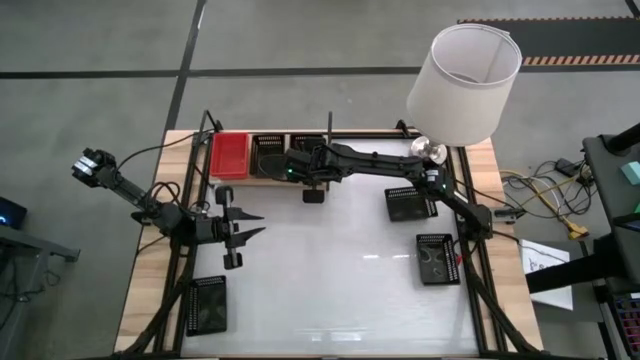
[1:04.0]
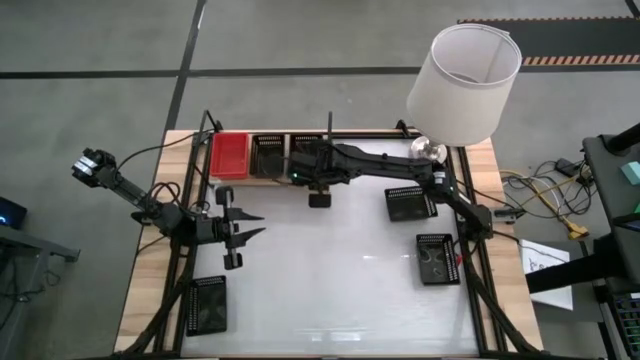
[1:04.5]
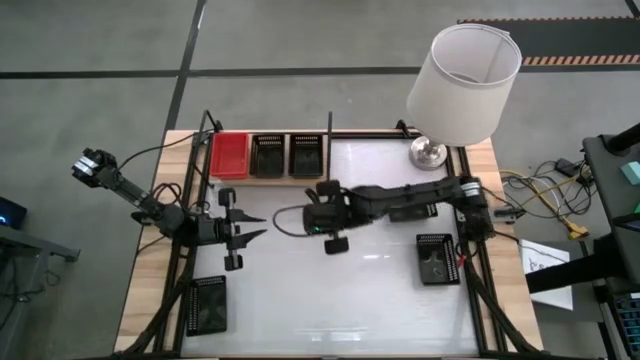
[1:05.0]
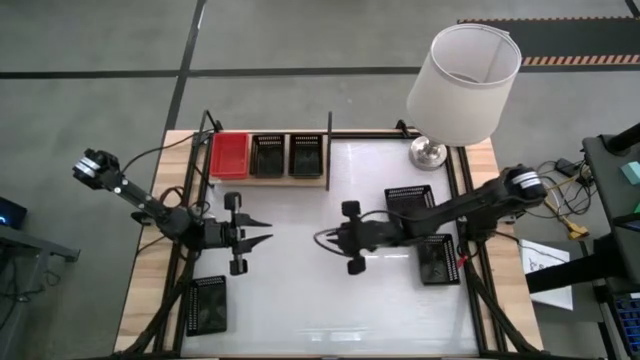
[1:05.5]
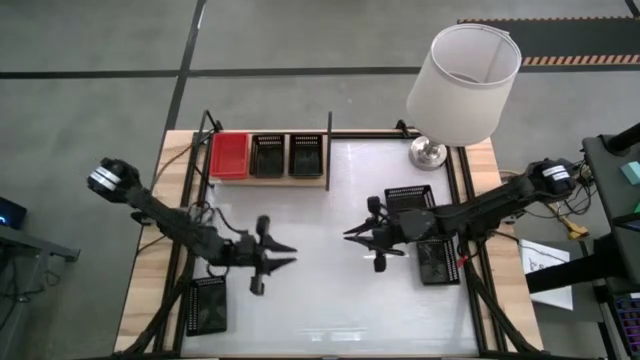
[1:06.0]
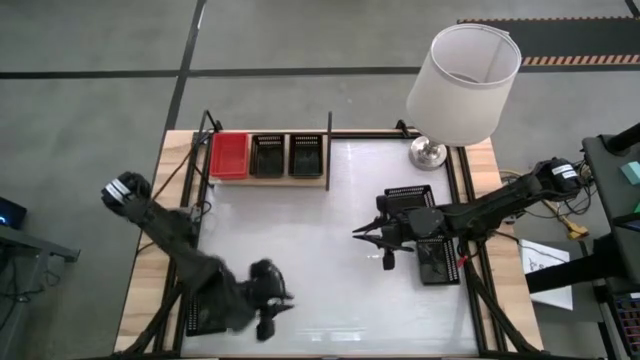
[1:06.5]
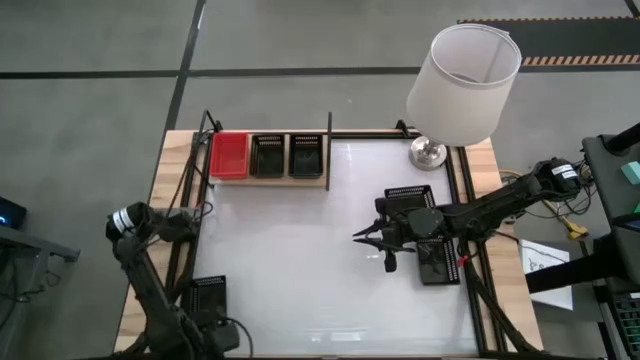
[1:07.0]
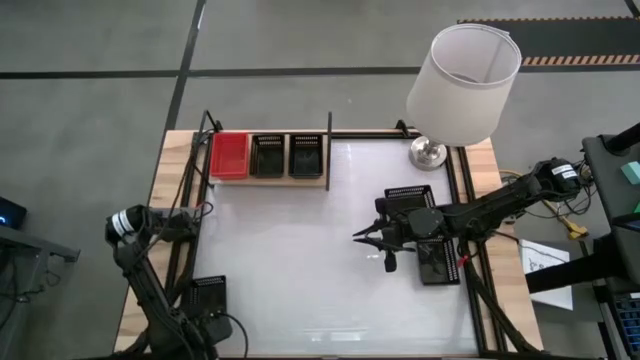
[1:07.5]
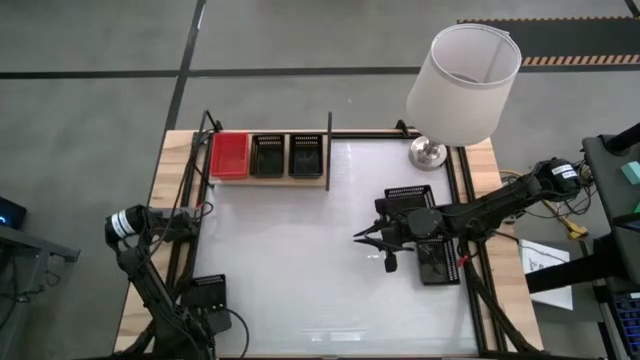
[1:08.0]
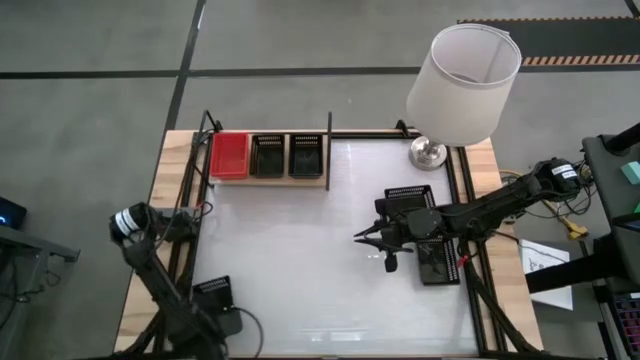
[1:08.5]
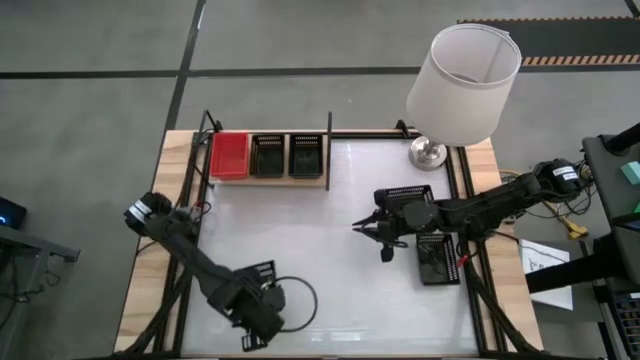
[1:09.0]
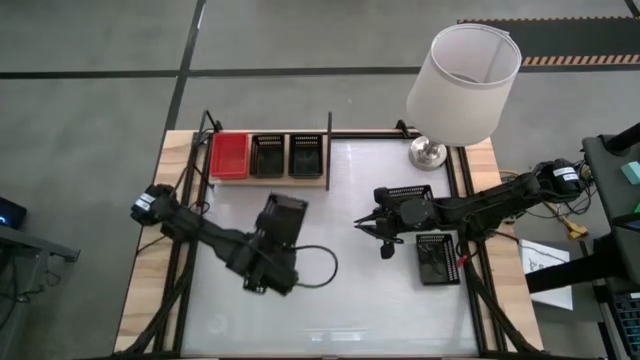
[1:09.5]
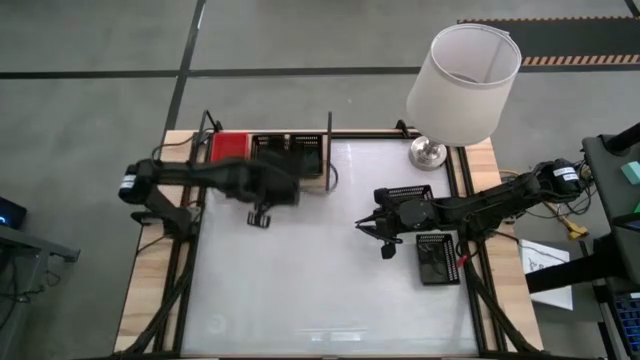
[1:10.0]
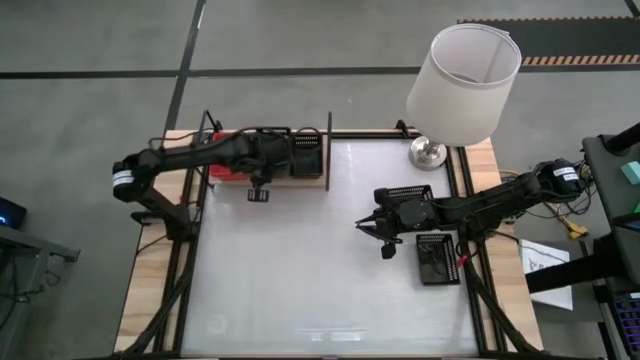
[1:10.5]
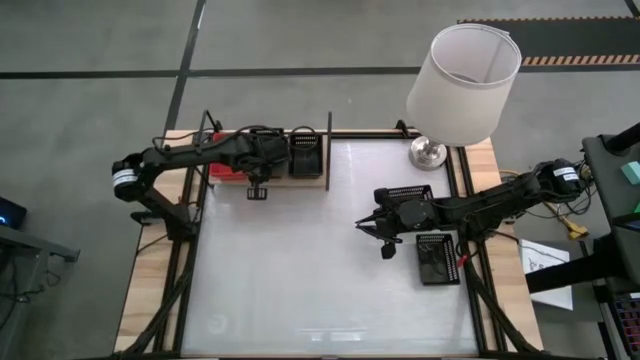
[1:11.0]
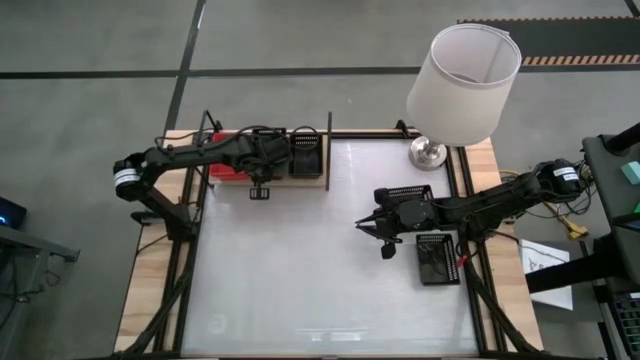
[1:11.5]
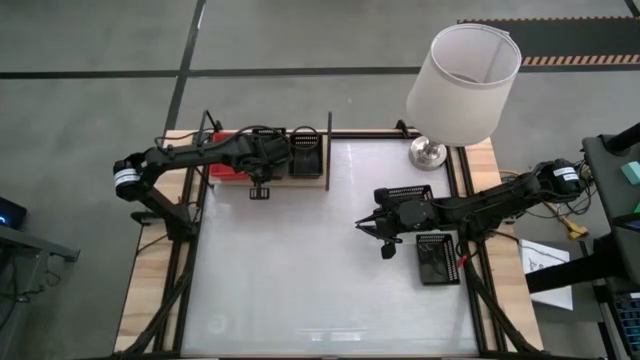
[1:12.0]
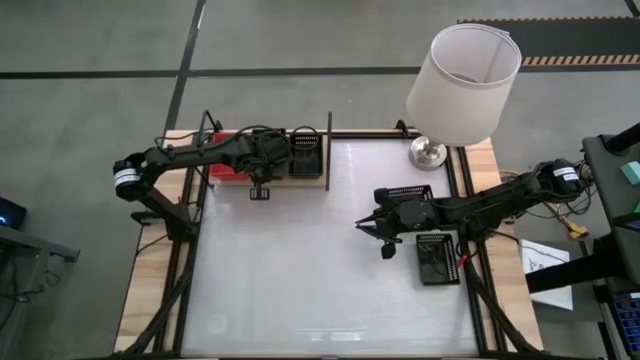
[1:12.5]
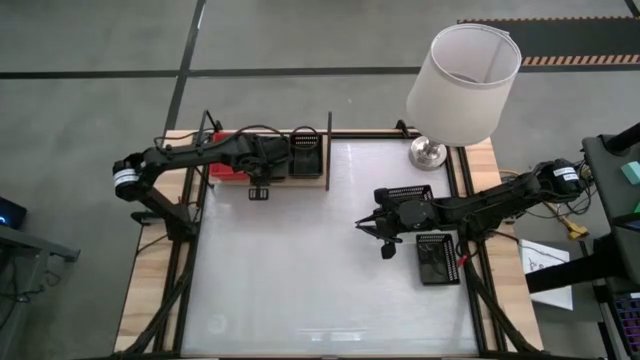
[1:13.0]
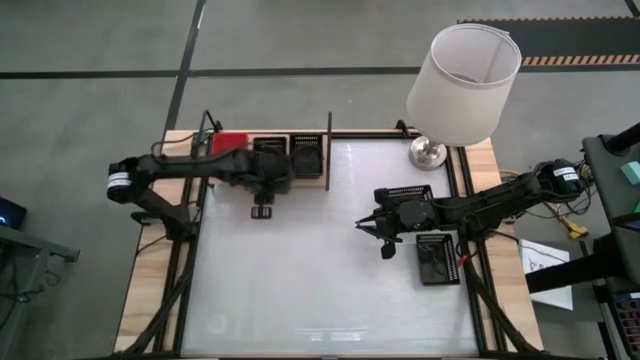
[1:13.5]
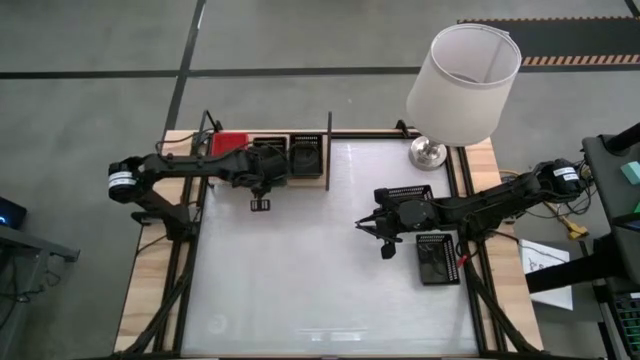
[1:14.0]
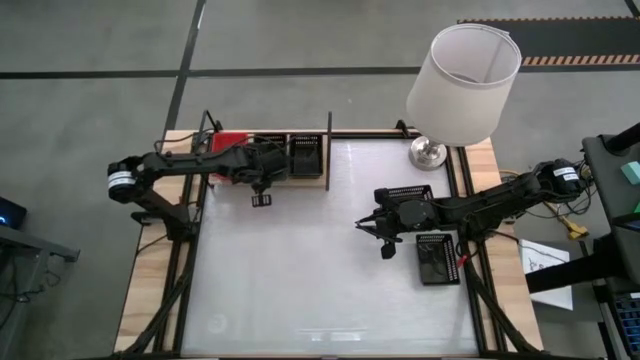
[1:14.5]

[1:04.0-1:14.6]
Task: Stack baskets on shelf by color
Stack the black basket on top of the left black basket on the shelf

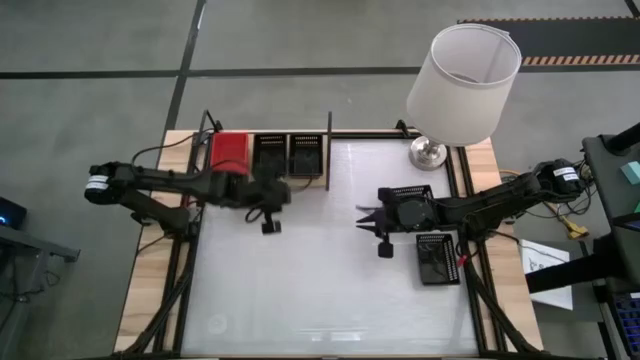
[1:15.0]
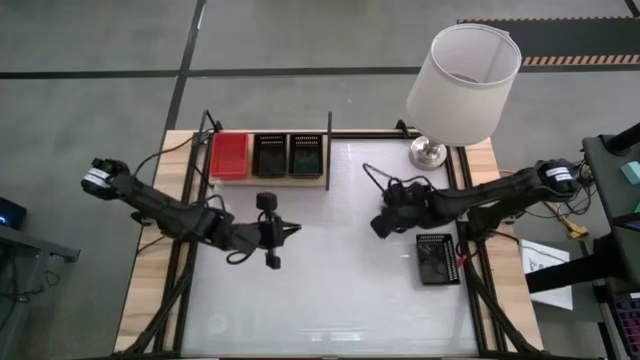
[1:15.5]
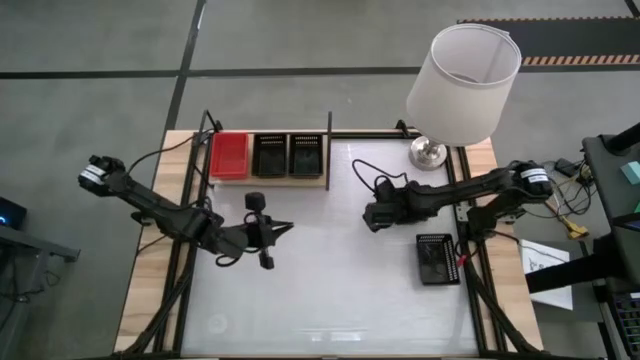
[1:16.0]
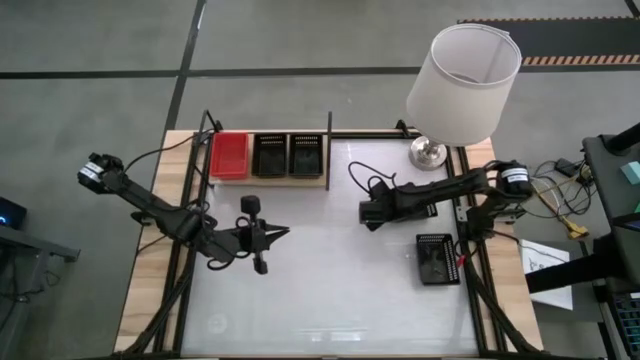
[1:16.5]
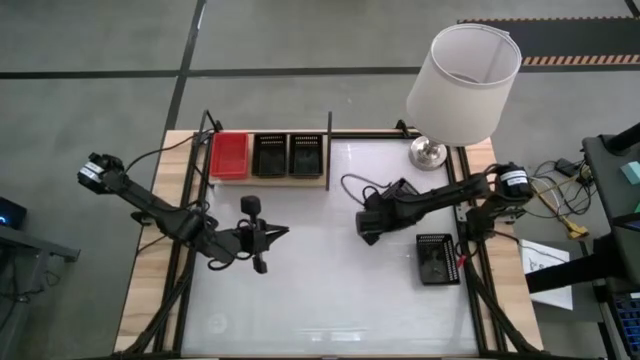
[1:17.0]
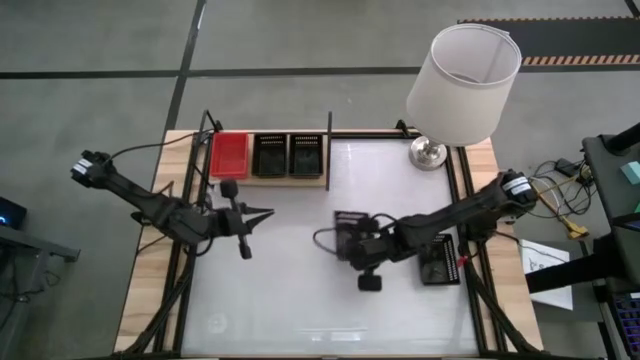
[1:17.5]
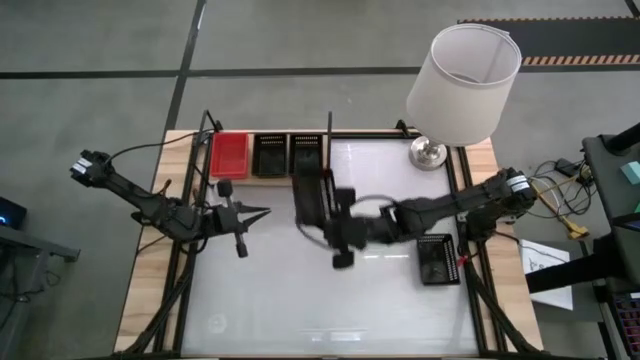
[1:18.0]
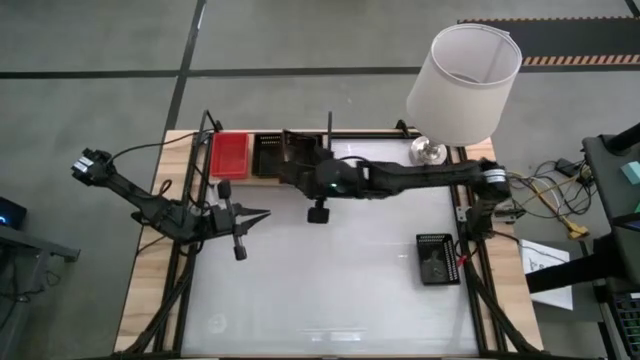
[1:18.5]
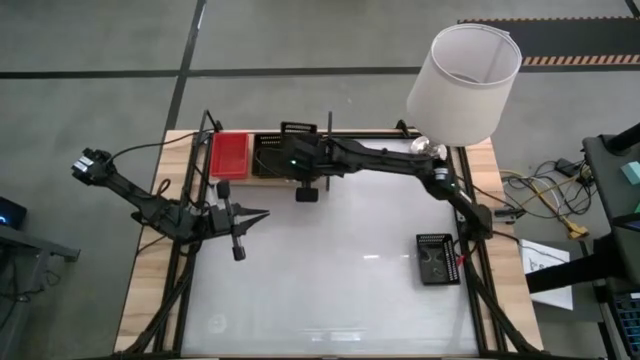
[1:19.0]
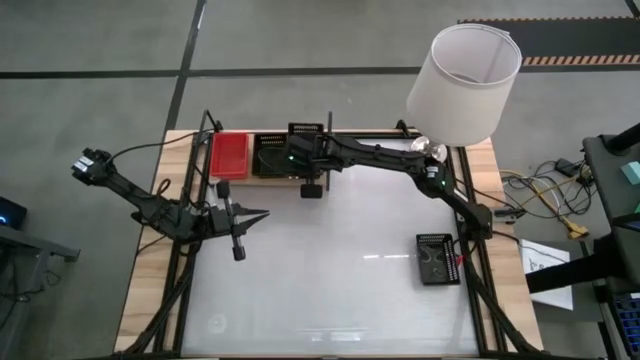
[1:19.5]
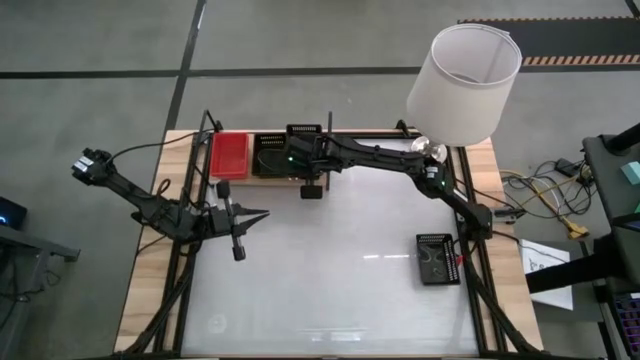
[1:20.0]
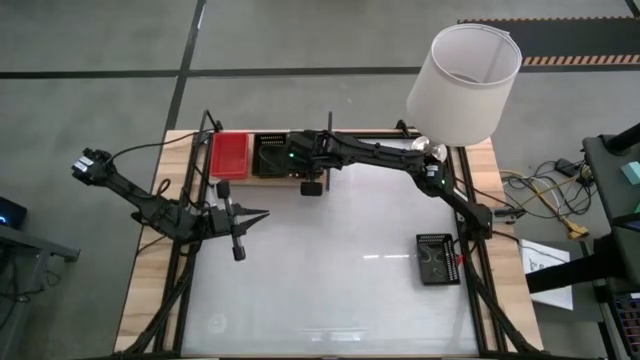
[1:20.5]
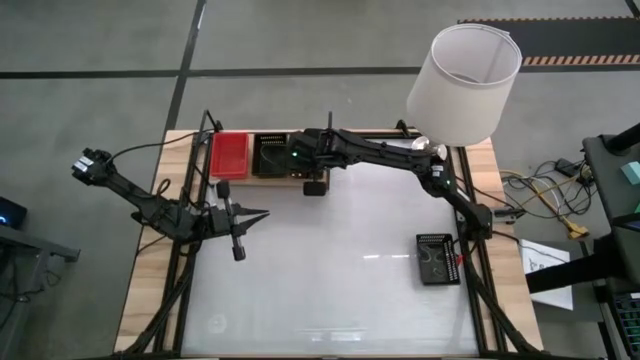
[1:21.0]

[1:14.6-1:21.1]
Stack the black basket on top of the right black basket on the shelf

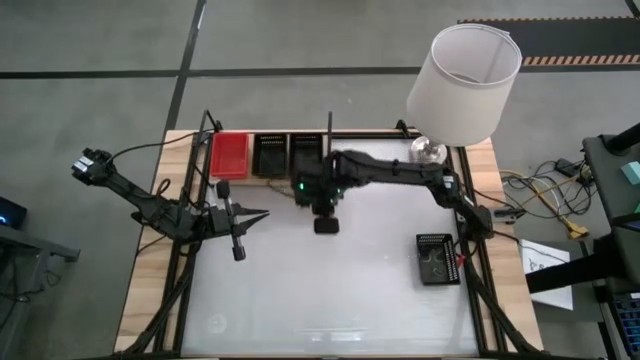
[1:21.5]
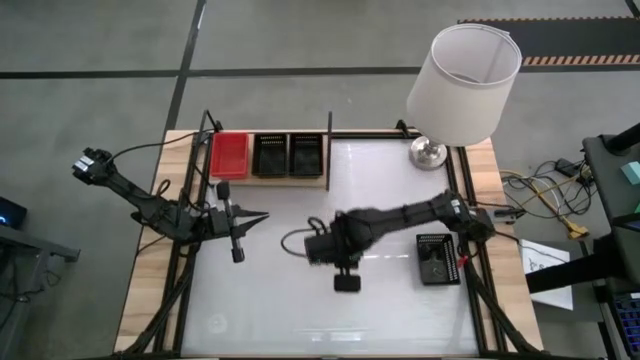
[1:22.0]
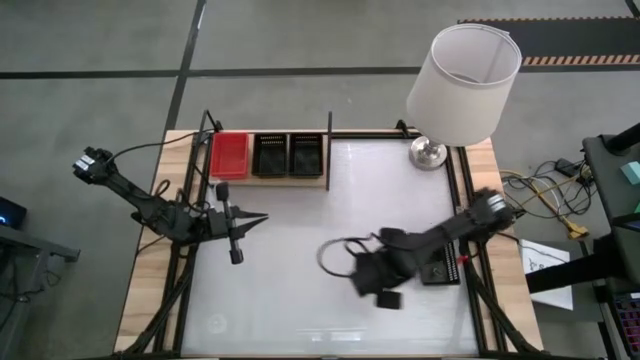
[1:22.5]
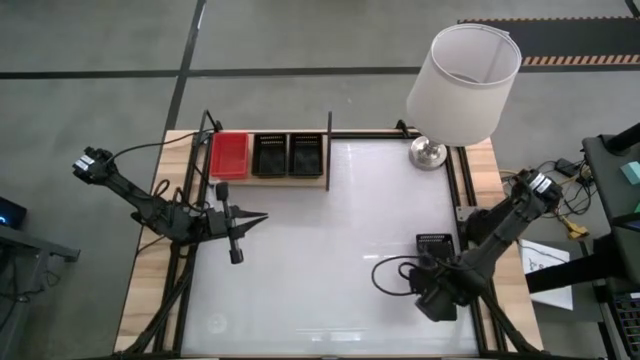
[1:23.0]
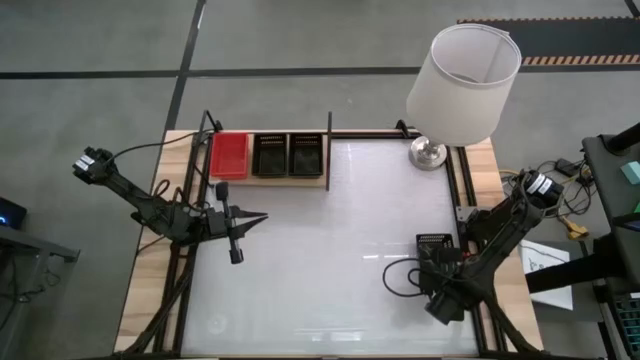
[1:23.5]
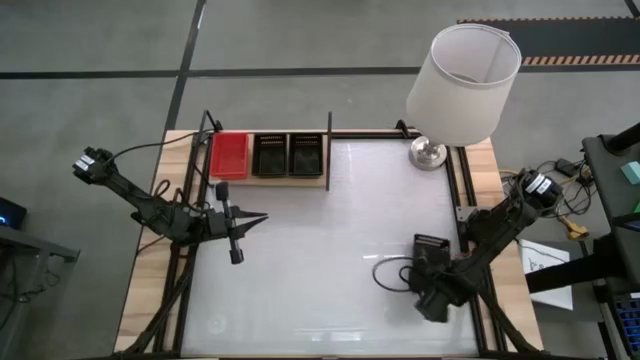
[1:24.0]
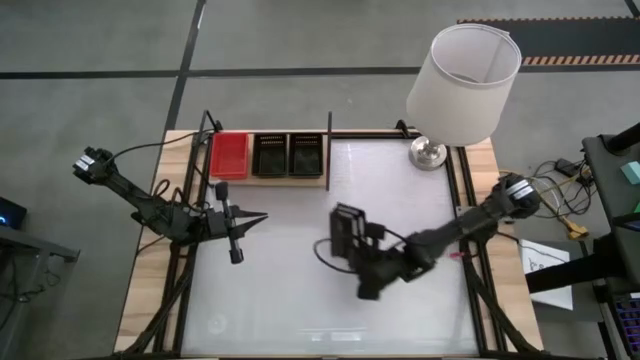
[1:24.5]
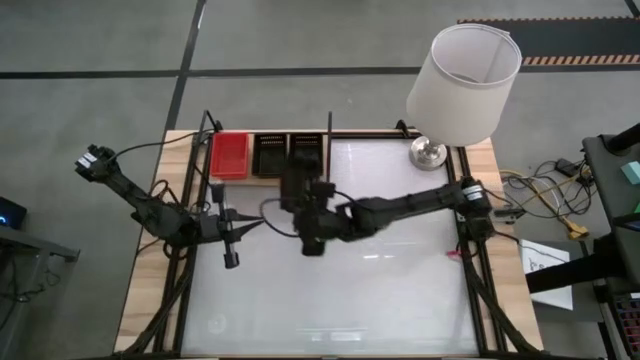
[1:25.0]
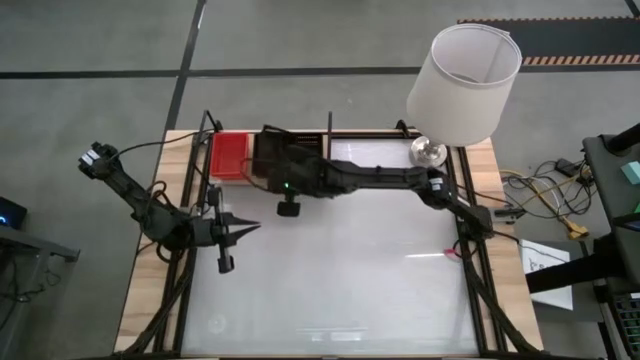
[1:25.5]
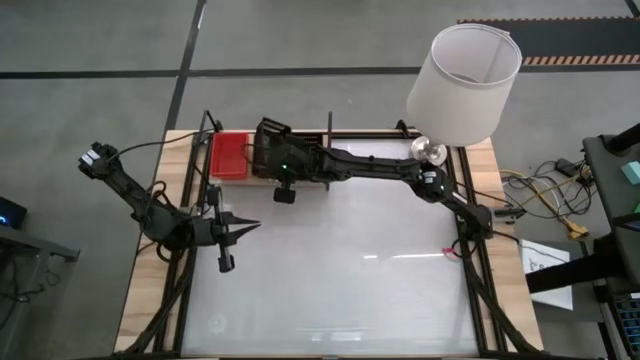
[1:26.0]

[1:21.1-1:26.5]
Stack the black basket on top of the left black basket on the shelf
